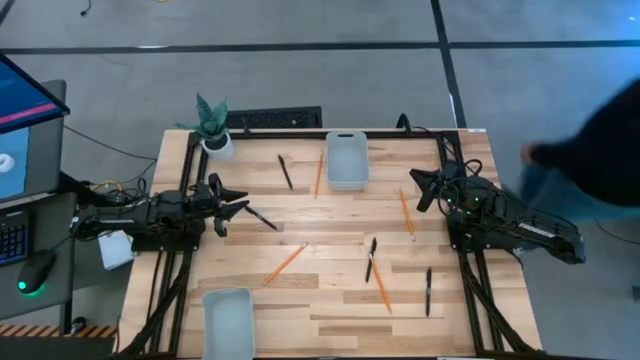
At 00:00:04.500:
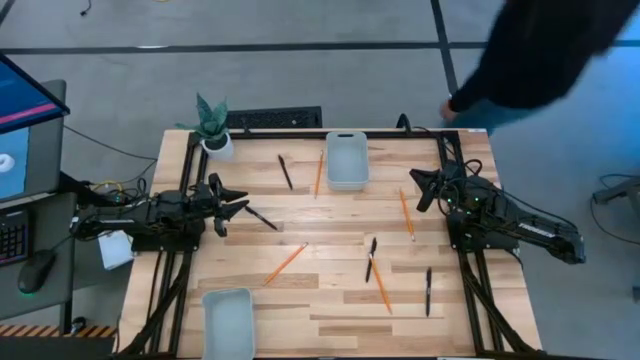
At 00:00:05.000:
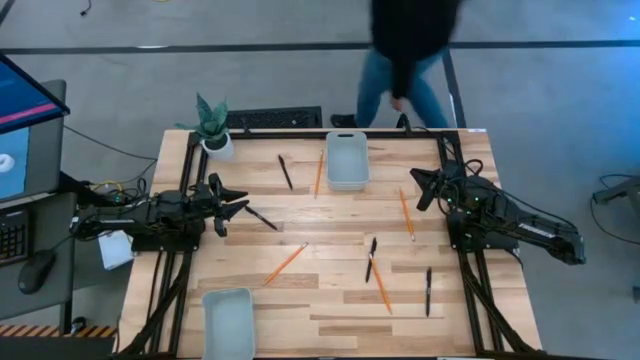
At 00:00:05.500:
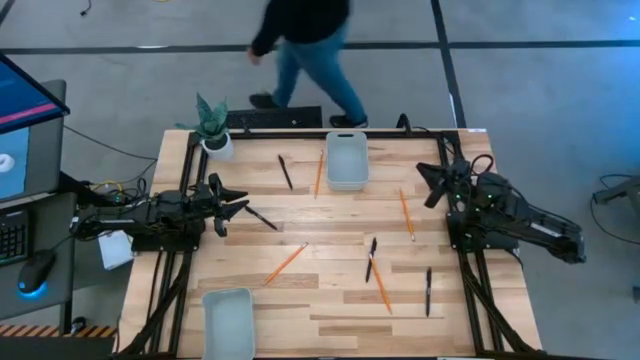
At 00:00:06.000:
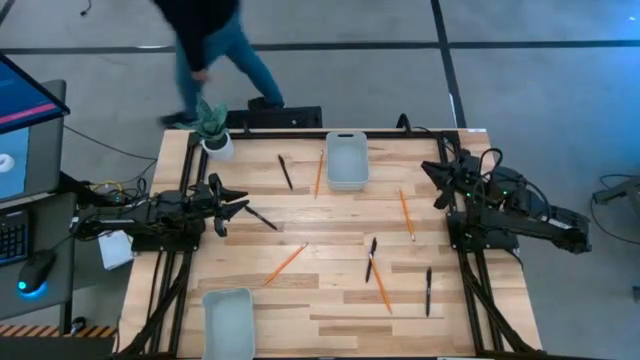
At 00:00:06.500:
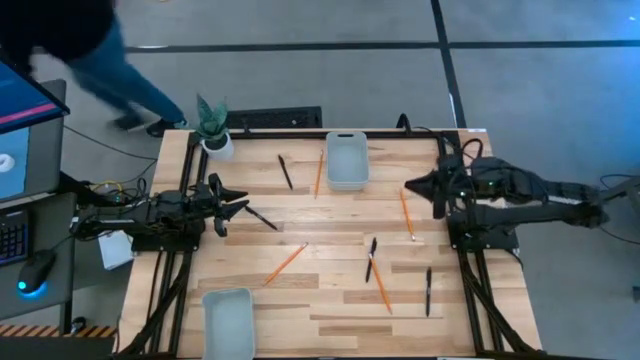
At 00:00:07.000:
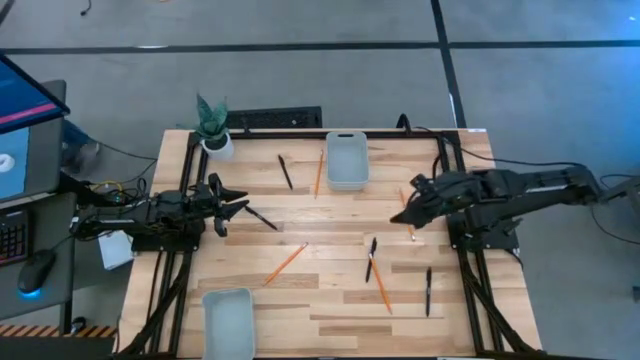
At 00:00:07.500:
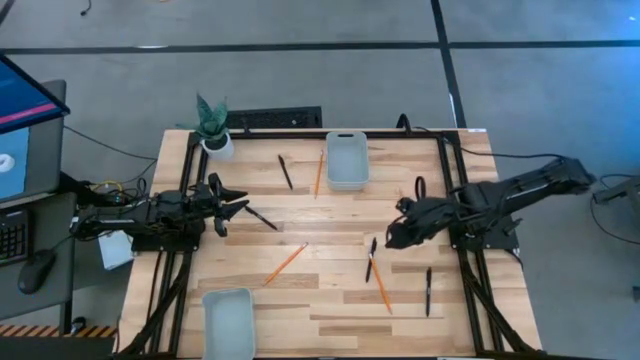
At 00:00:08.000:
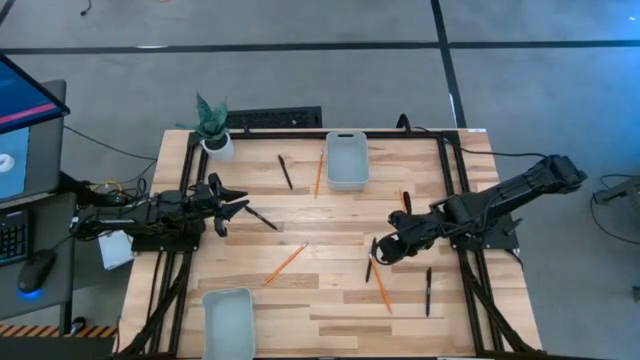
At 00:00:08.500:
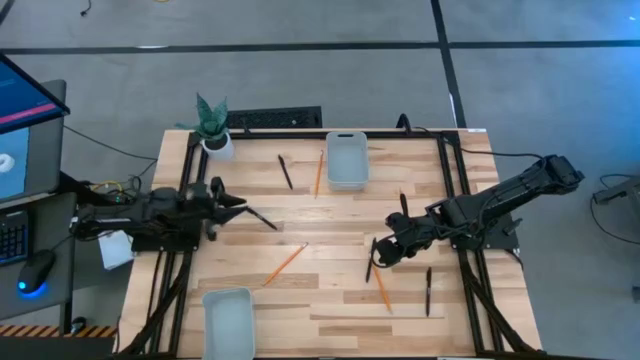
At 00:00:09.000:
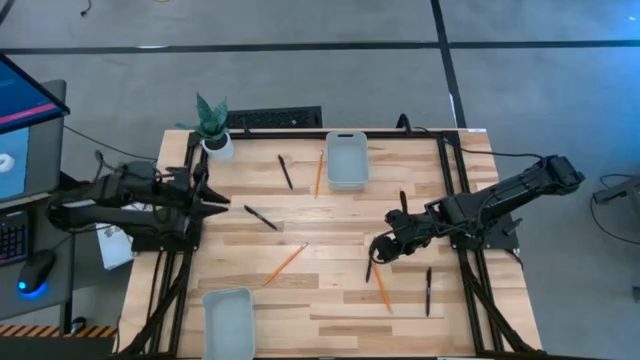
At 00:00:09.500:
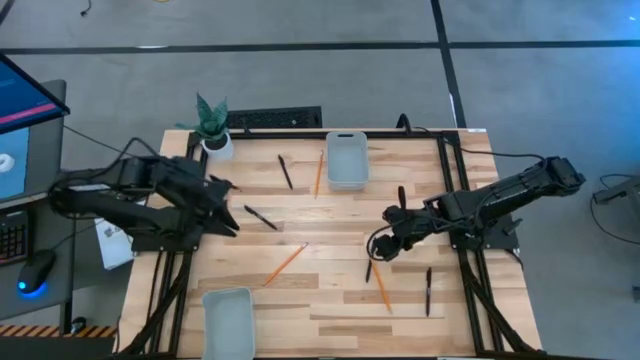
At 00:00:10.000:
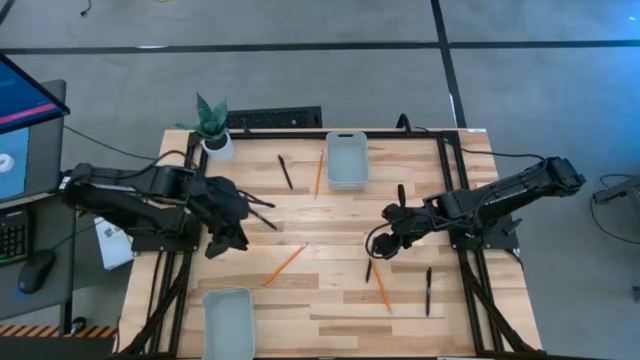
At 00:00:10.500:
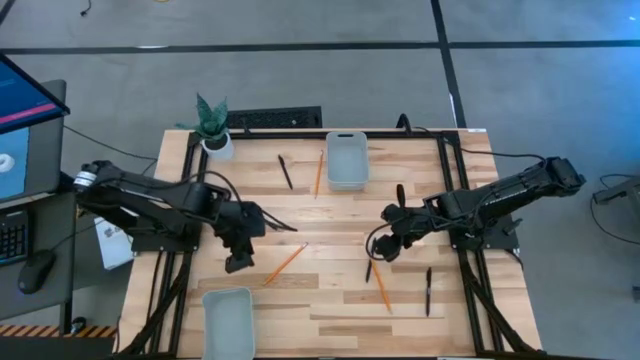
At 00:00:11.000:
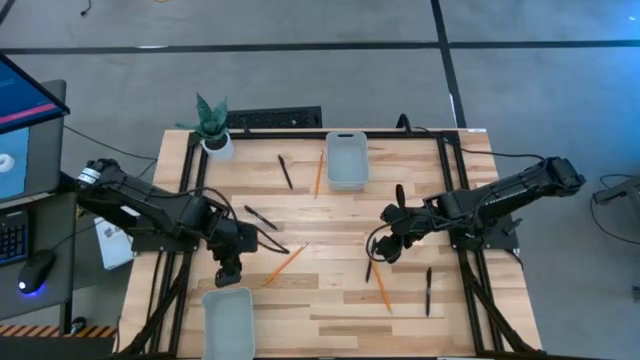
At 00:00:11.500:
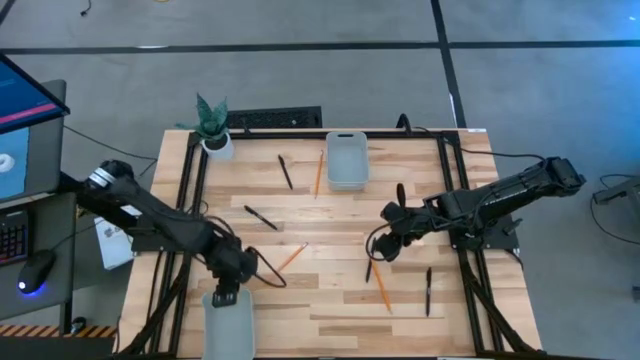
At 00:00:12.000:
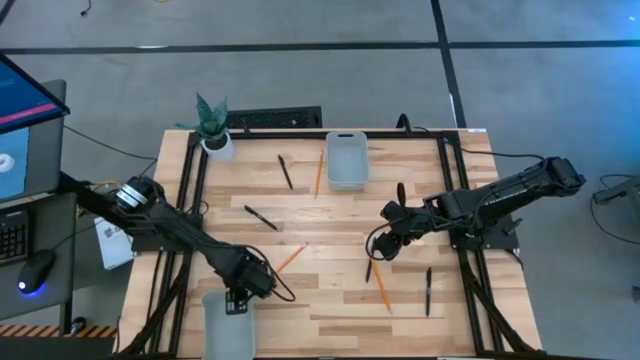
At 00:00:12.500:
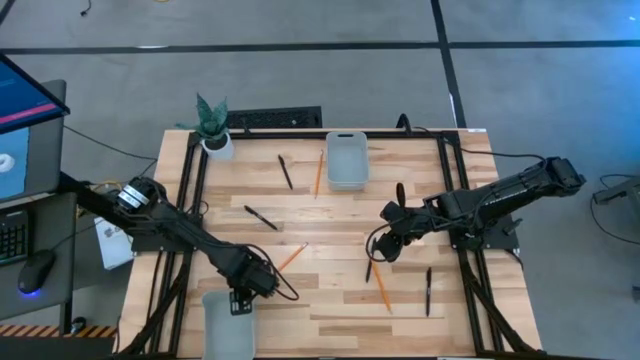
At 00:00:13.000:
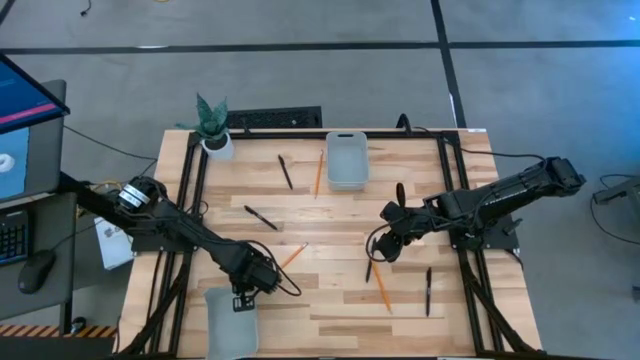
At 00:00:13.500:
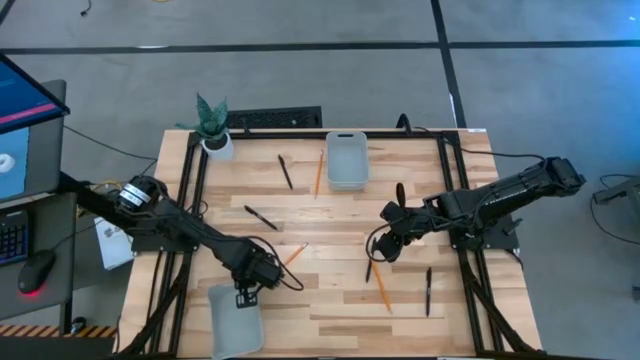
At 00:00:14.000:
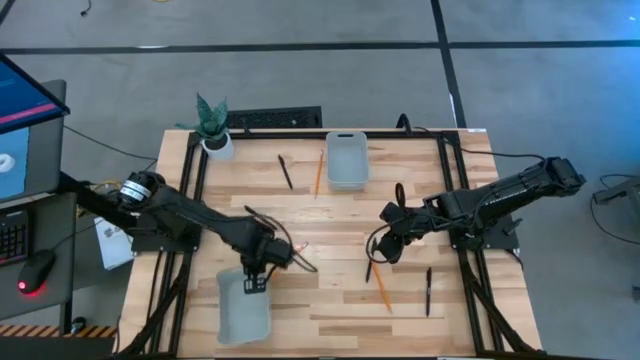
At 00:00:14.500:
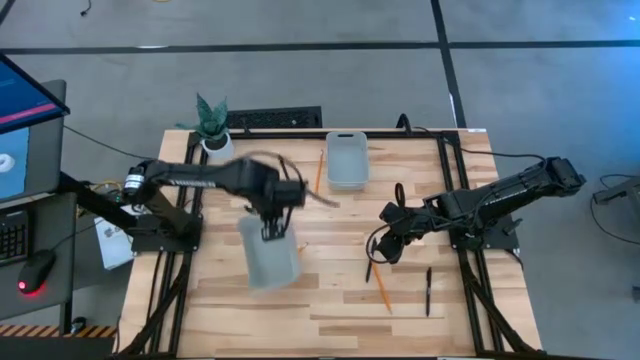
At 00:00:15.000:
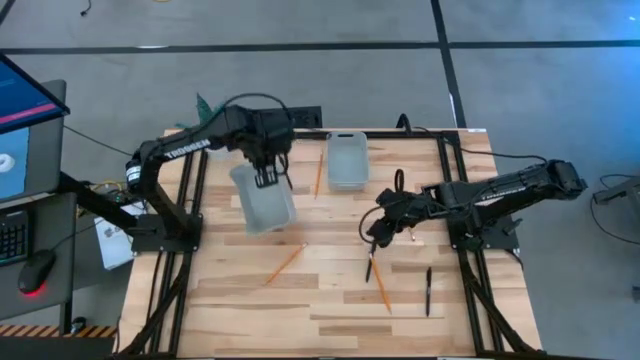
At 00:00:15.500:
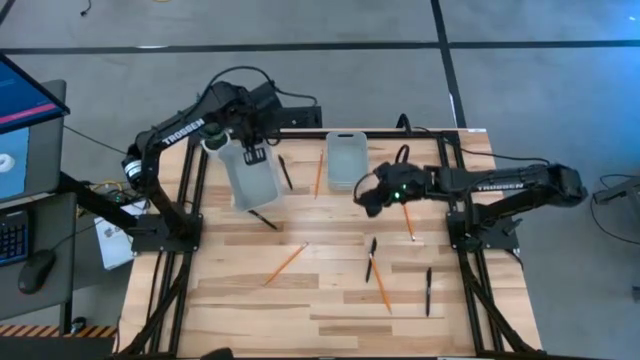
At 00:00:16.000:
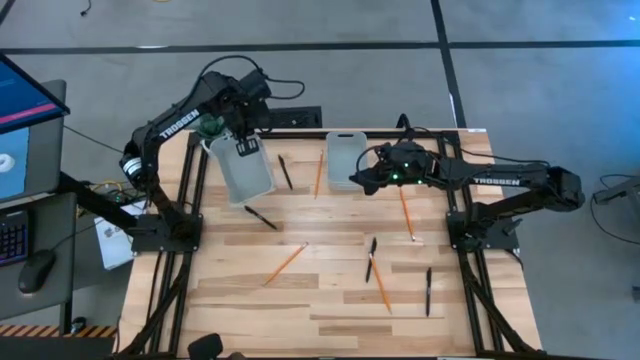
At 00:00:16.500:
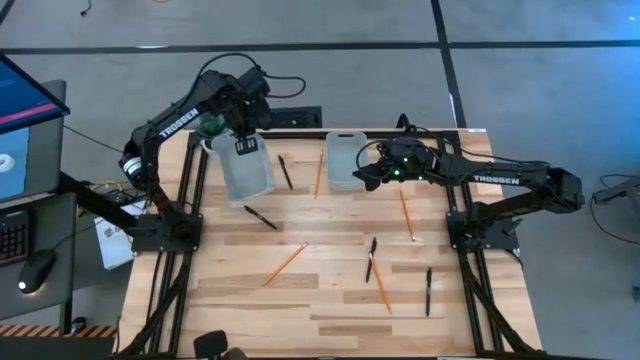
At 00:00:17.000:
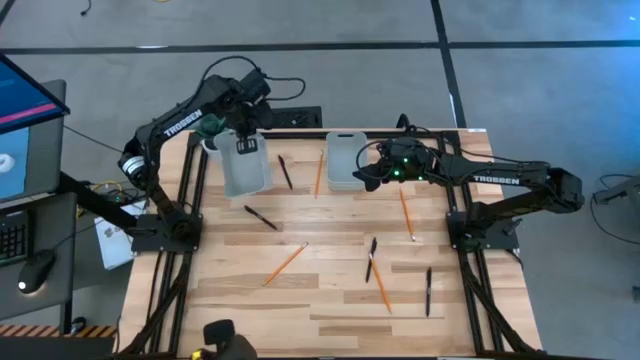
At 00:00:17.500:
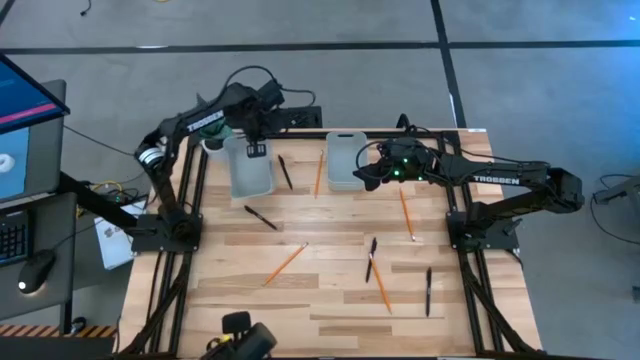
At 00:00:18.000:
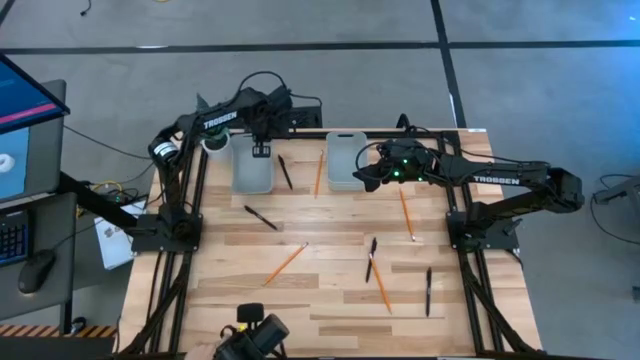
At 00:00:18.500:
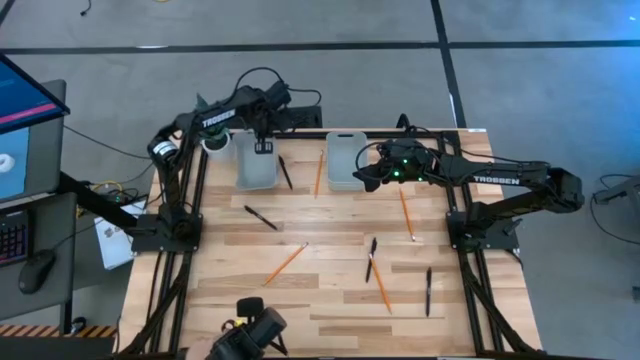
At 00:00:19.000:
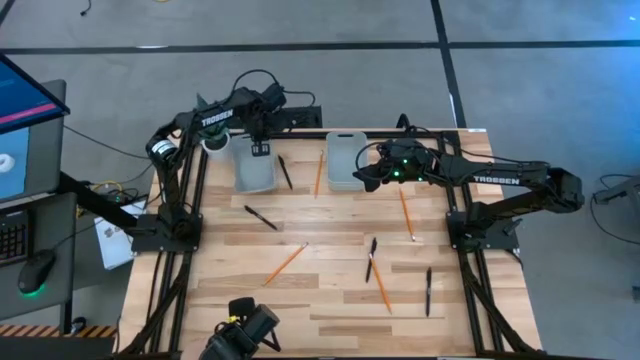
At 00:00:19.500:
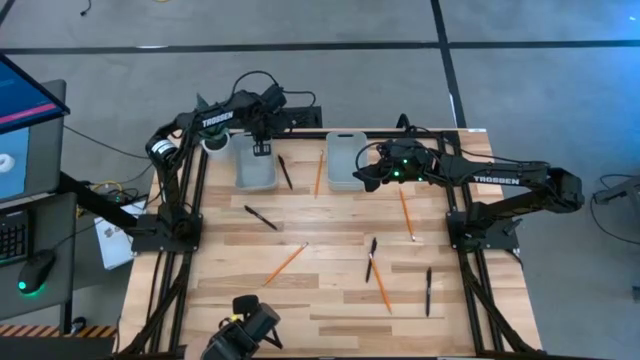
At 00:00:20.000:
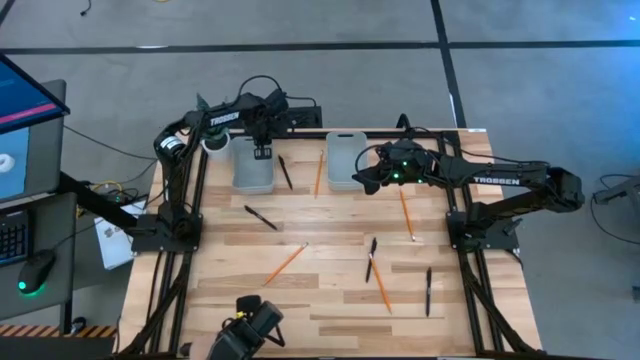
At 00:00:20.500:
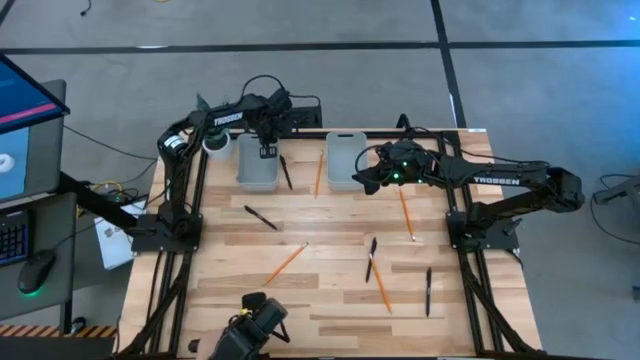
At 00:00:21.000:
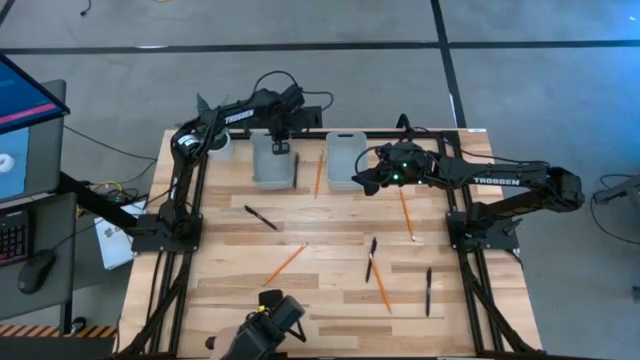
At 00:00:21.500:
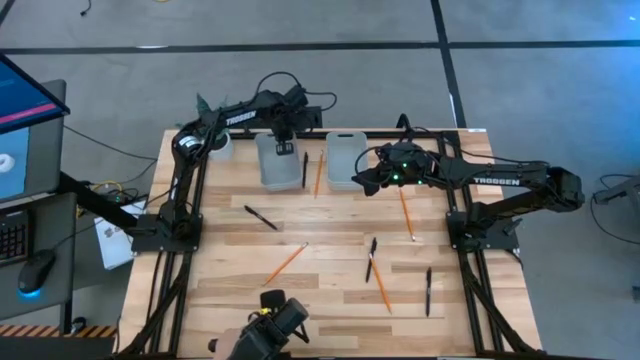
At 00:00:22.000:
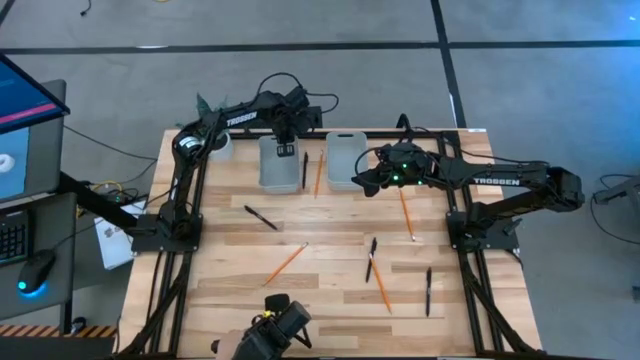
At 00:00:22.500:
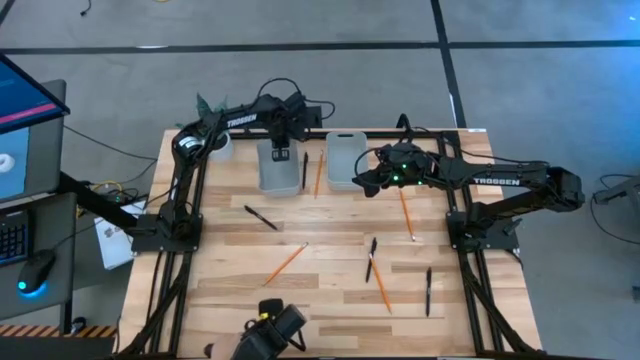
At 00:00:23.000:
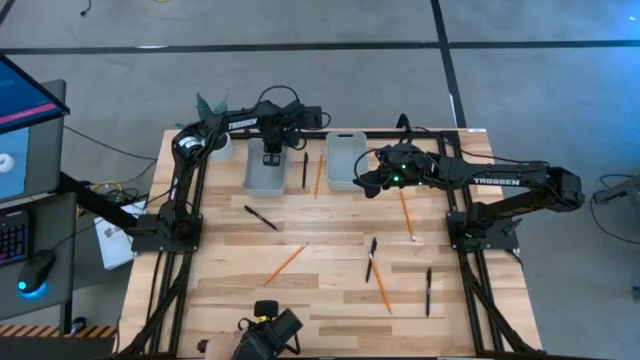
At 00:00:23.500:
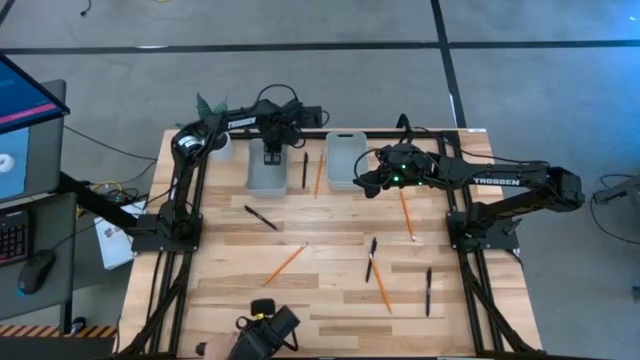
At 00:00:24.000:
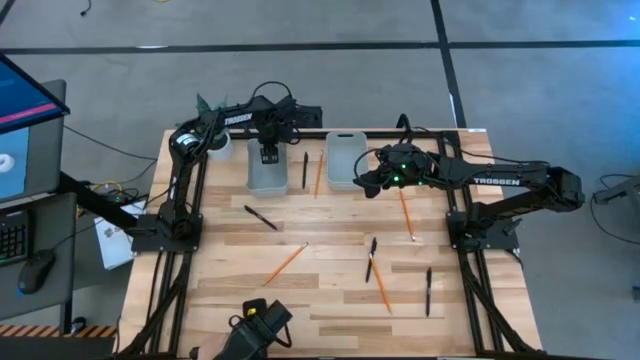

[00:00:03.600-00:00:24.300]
Task: Sort pens & pencils
Move the bottom gray bin to the top left of the table
